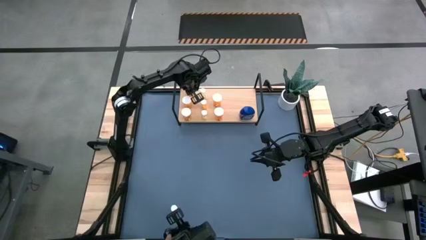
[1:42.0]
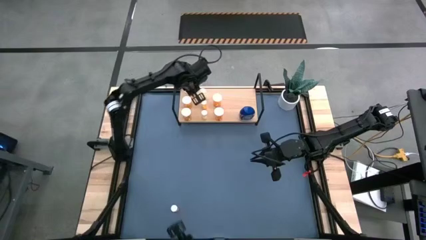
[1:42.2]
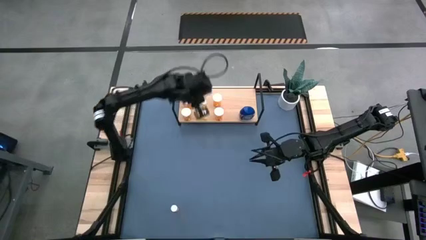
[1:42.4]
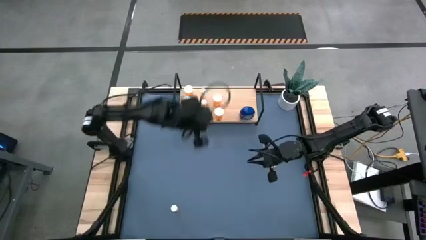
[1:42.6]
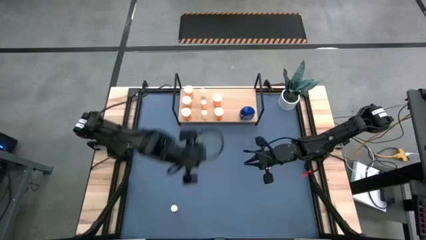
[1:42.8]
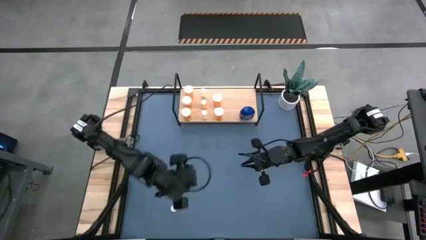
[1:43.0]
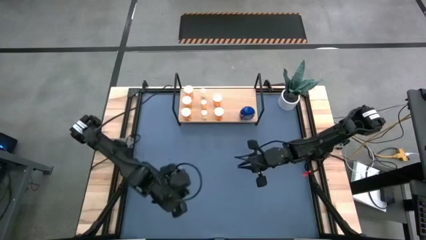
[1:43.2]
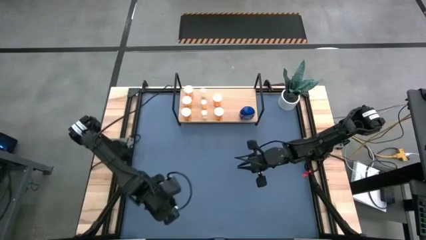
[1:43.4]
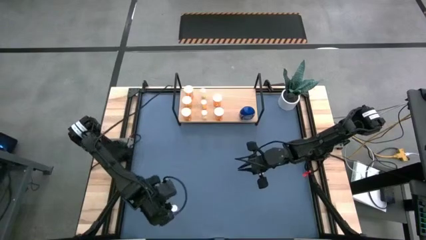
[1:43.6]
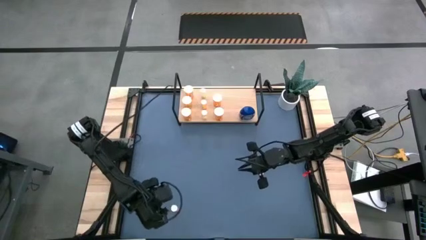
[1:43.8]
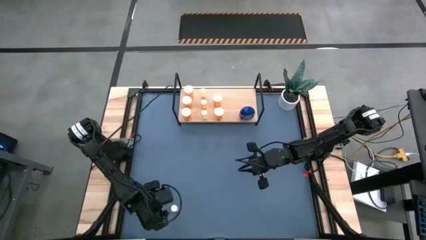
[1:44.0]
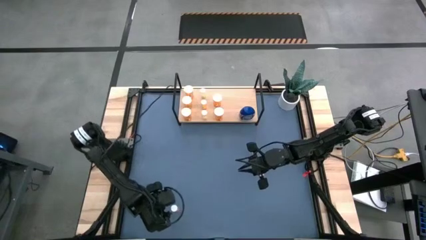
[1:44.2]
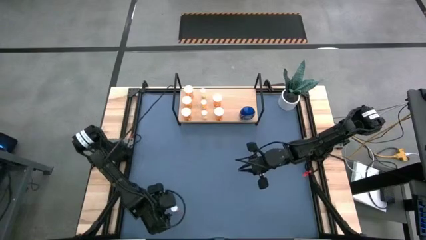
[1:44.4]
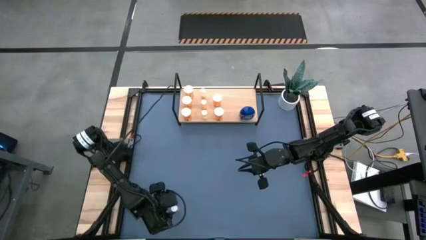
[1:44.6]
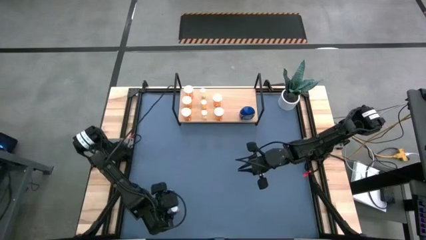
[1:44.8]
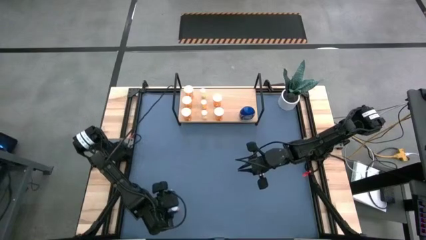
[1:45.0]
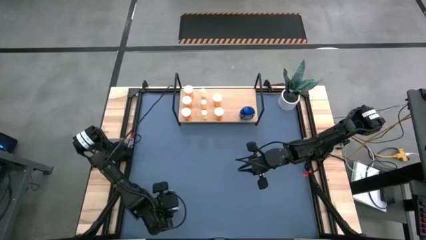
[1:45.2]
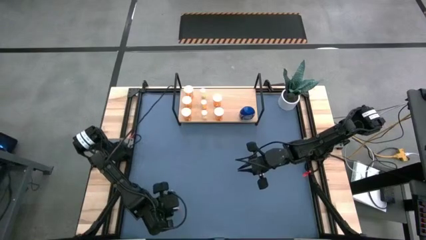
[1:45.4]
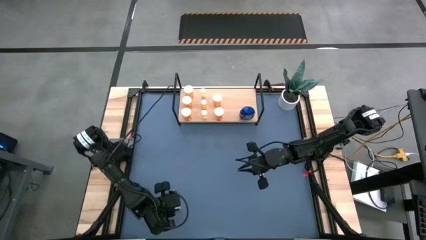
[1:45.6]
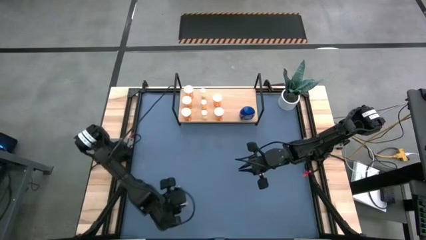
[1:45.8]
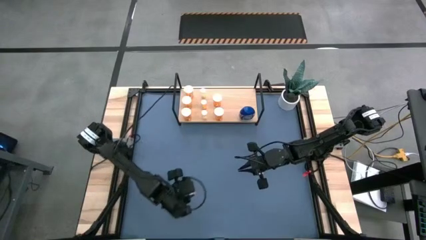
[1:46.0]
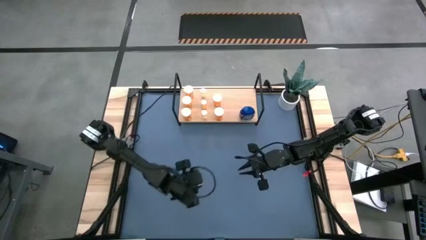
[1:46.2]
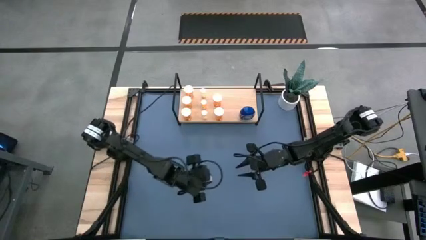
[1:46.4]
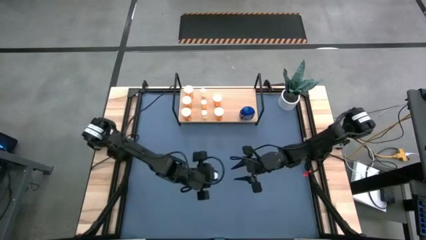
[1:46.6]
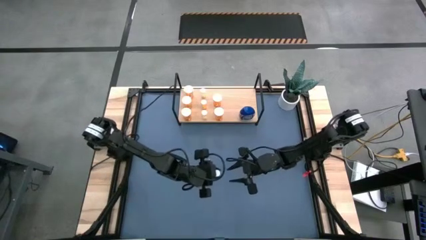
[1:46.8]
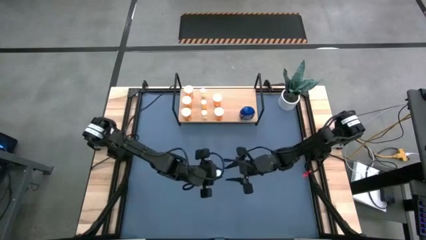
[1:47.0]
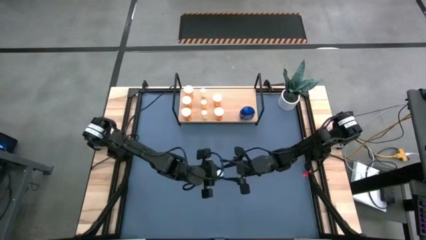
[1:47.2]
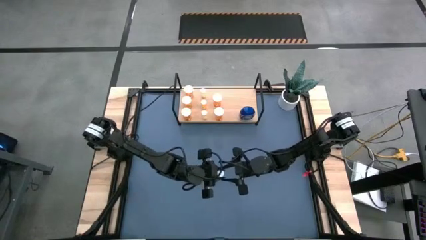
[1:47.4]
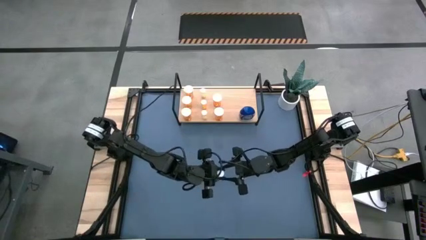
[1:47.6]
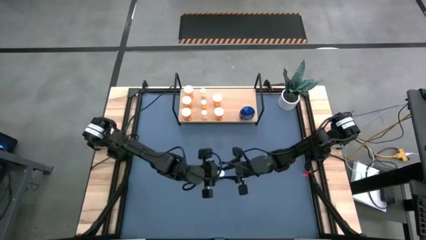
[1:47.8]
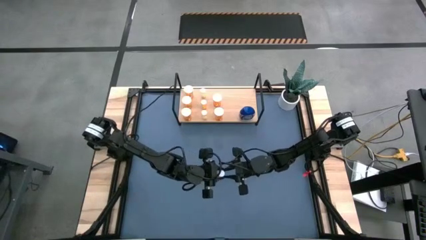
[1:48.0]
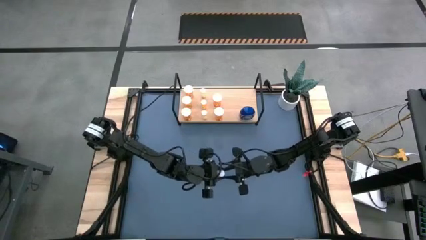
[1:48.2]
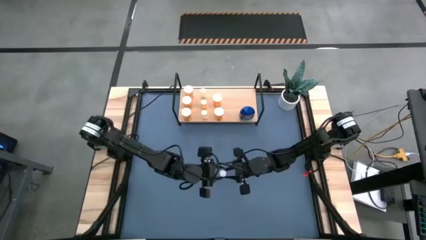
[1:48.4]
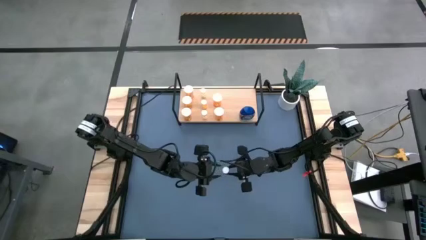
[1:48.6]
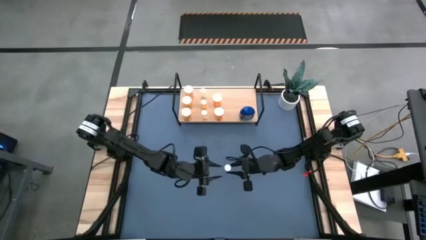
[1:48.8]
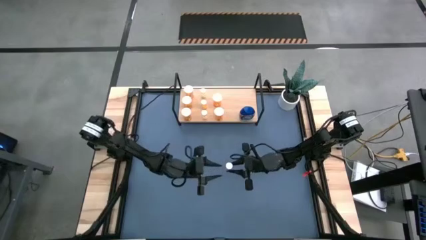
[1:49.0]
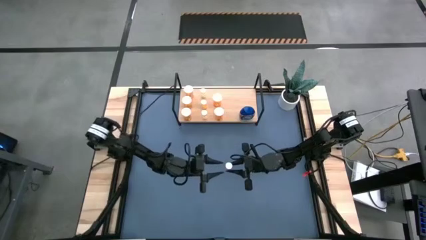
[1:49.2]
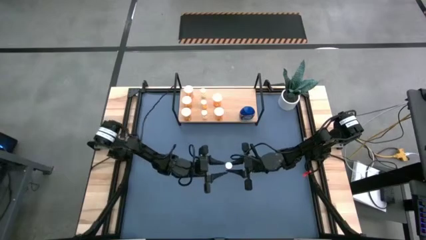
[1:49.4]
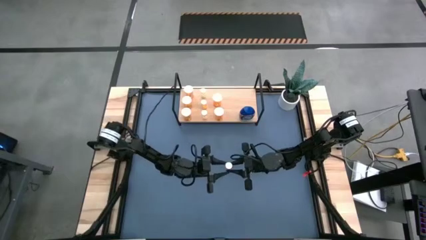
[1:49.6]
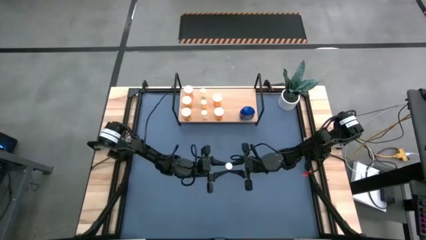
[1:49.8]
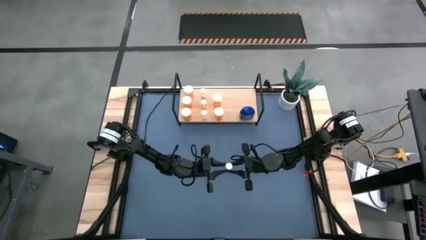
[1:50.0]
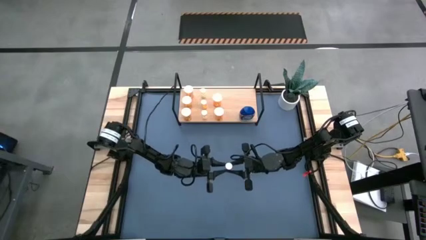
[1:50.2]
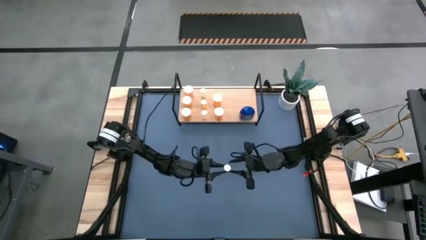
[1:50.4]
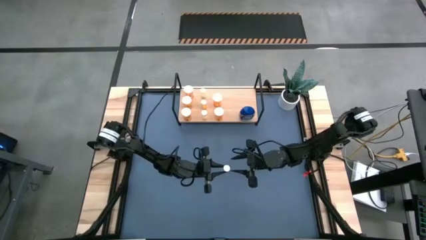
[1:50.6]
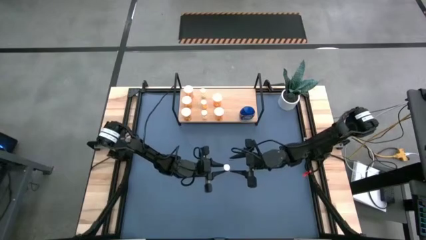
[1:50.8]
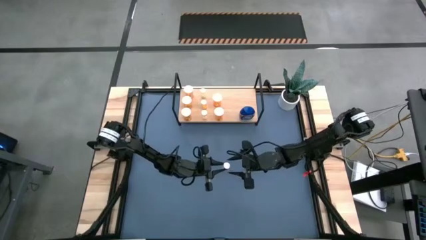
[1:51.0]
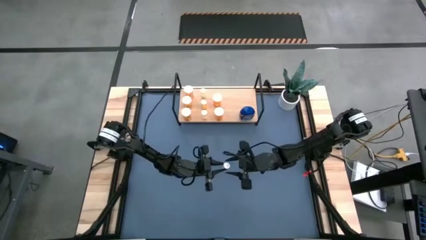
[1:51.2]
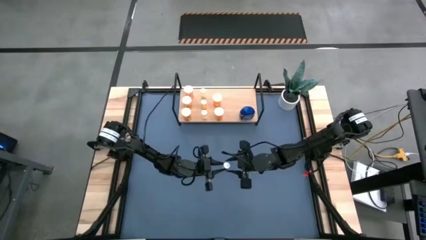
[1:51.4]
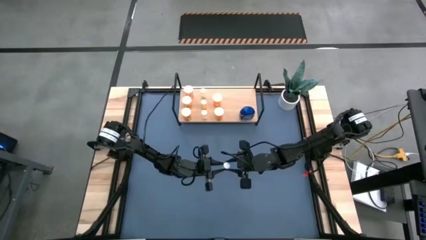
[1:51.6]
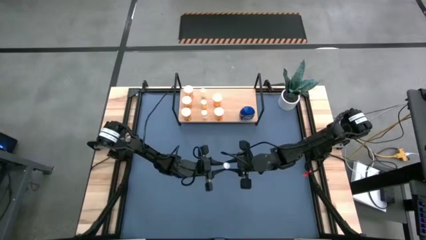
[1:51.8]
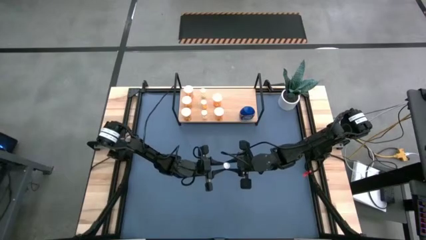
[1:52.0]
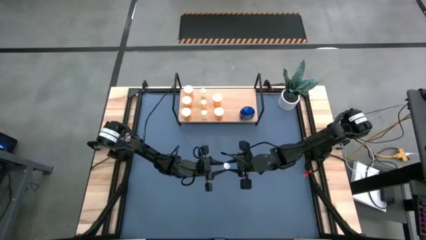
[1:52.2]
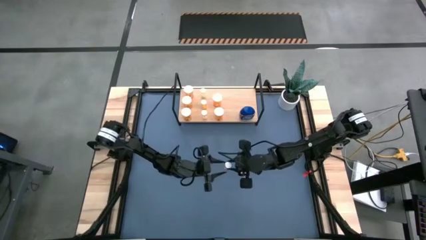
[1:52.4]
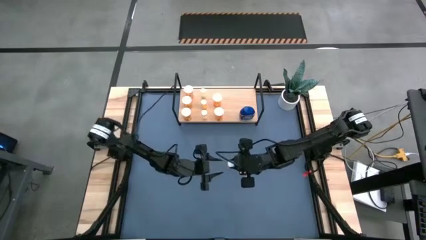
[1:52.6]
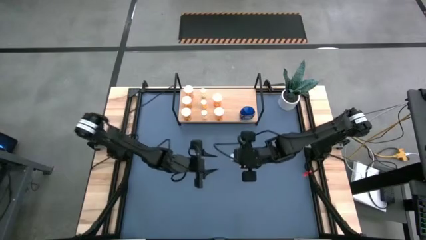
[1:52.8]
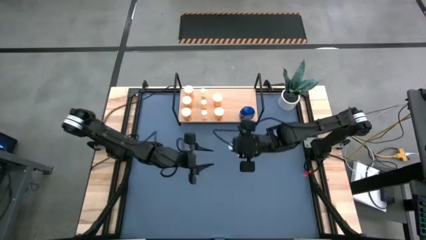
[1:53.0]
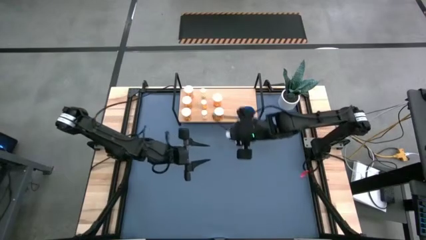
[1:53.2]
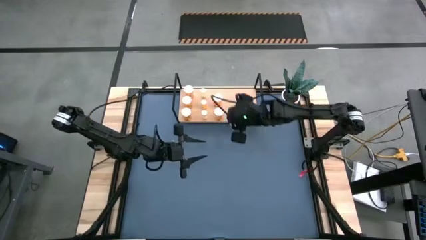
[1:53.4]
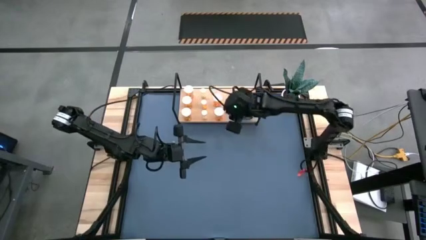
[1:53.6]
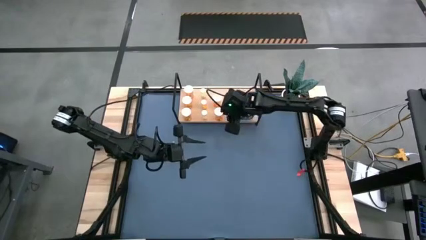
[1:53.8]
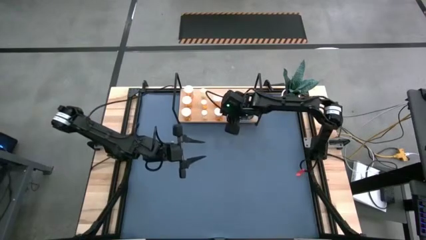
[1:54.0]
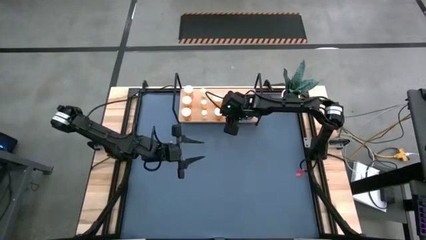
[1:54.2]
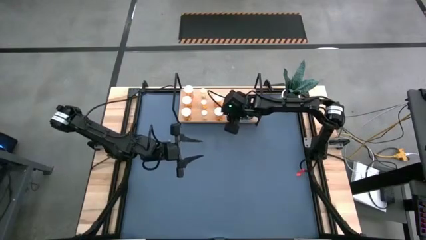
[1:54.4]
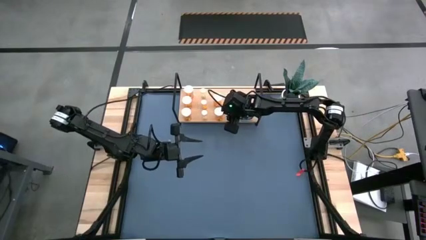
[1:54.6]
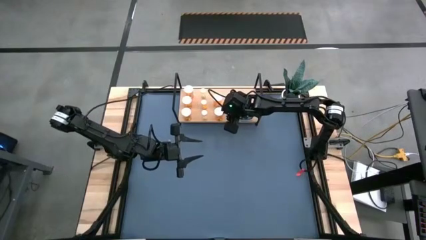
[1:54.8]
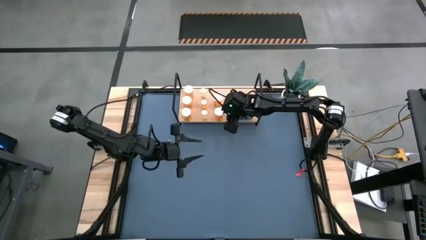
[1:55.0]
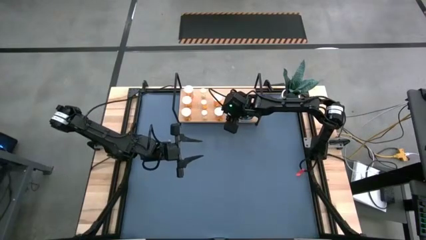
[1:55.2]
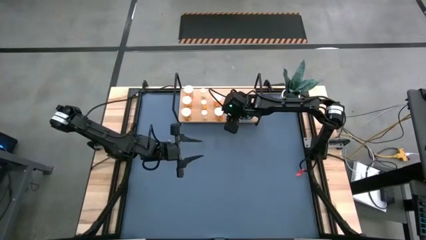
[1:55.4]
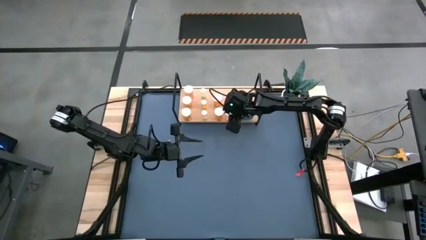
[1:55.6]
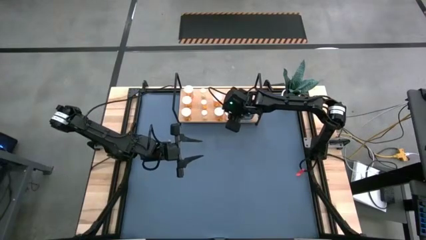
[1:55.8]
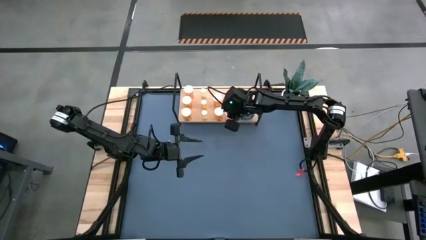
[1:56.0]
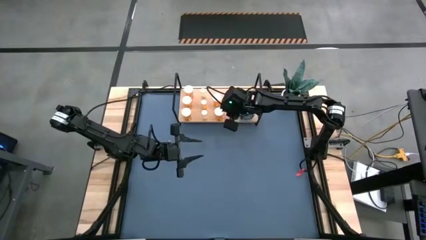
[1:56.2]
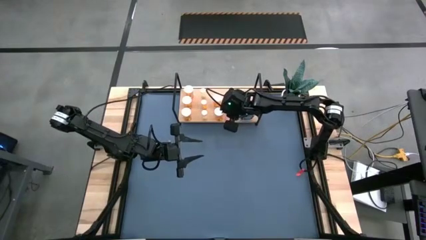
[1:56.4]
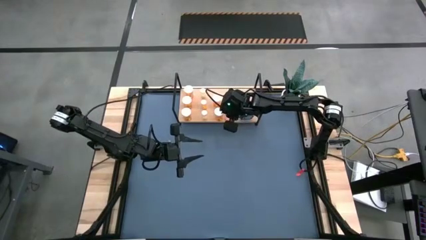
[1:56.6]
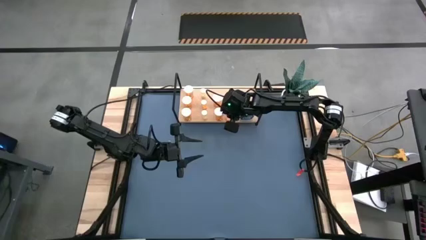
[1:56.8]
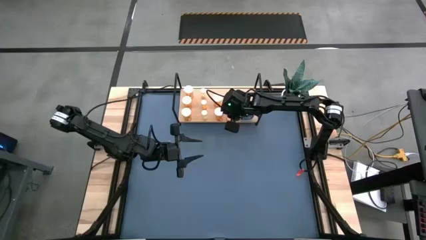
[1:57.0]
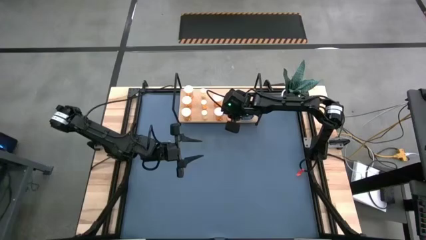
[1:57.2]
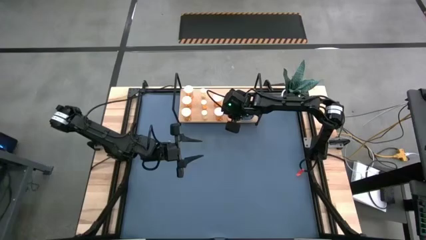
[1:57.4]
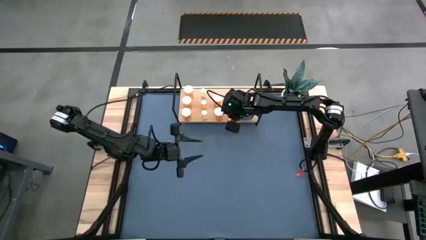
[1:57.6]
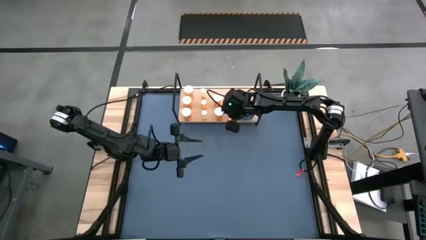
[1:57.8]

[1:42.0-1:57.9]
Task: Pick and place medicine bottles onto shelf by color
Put the red pill bottle on the shelf
